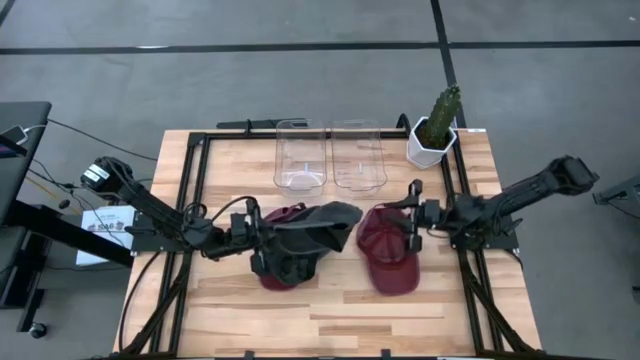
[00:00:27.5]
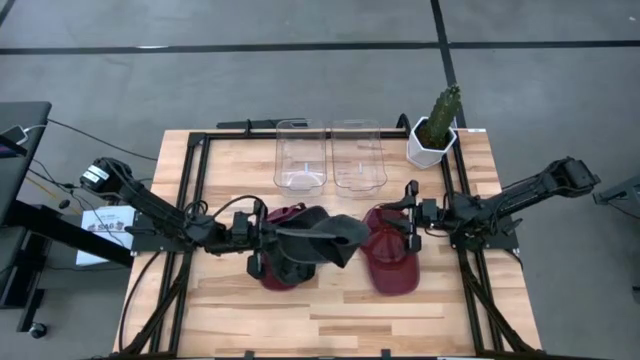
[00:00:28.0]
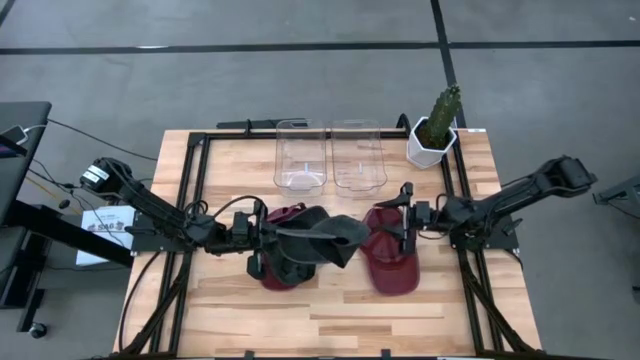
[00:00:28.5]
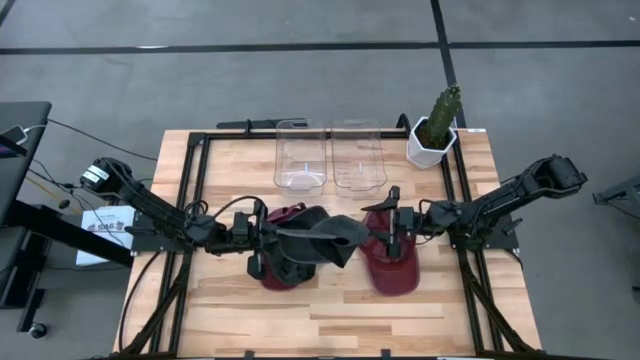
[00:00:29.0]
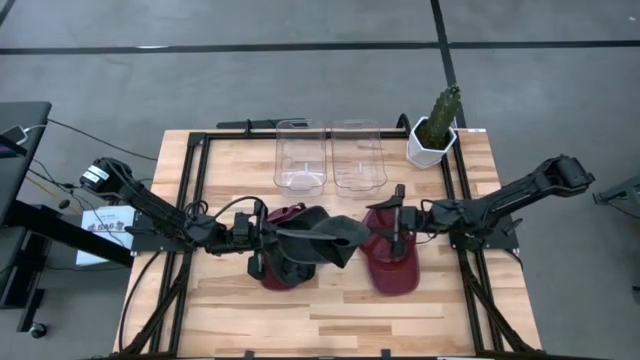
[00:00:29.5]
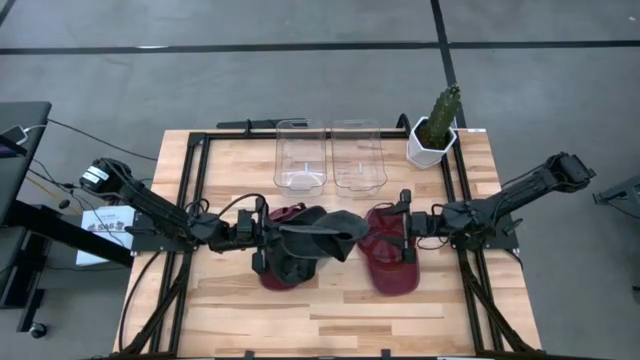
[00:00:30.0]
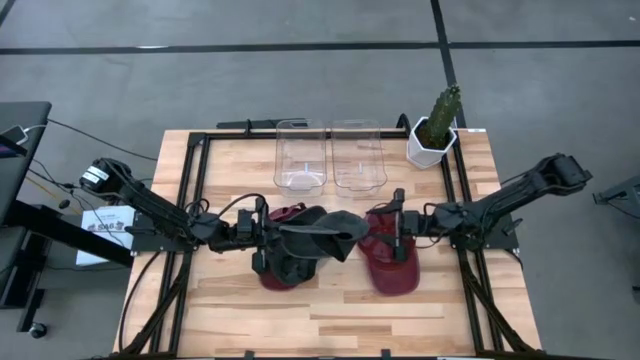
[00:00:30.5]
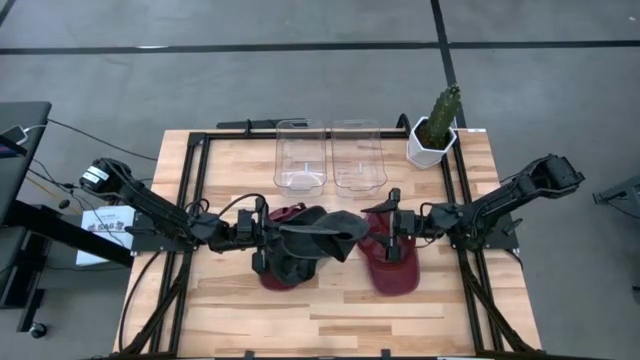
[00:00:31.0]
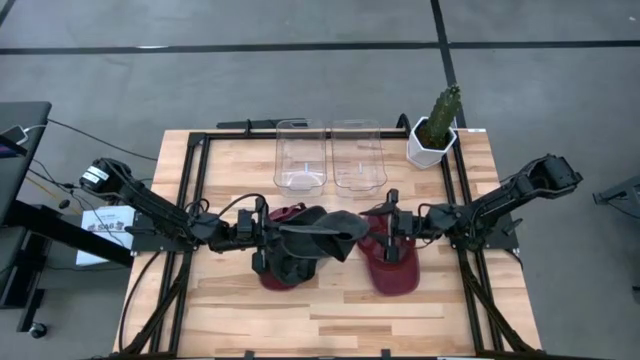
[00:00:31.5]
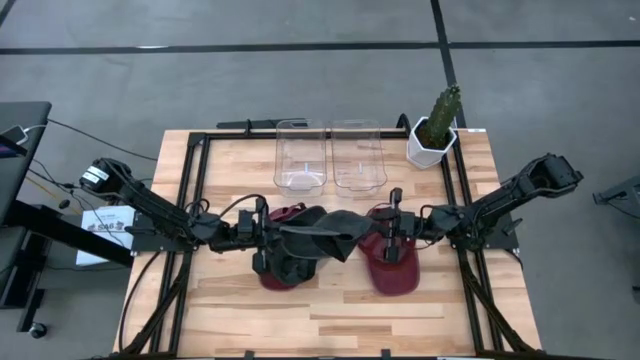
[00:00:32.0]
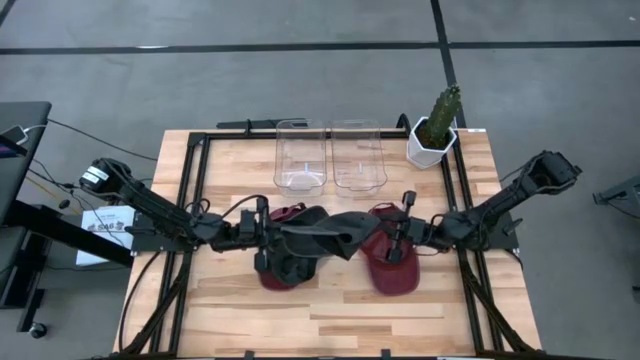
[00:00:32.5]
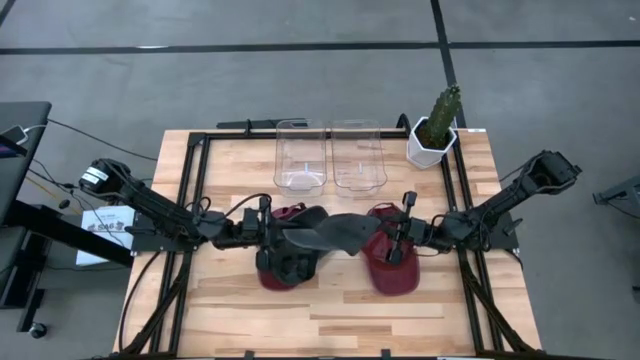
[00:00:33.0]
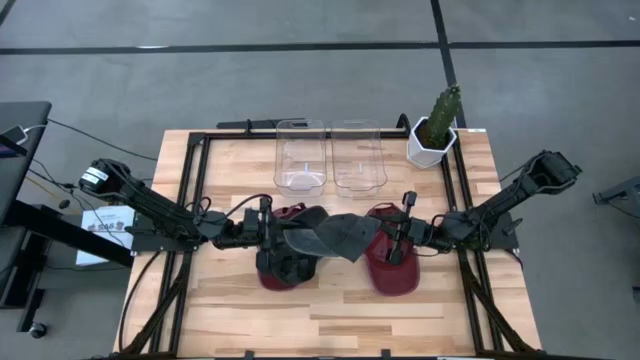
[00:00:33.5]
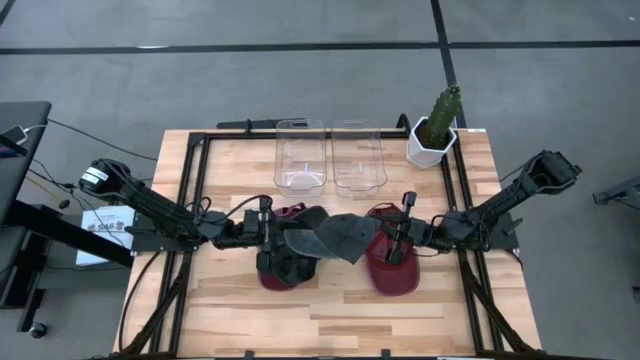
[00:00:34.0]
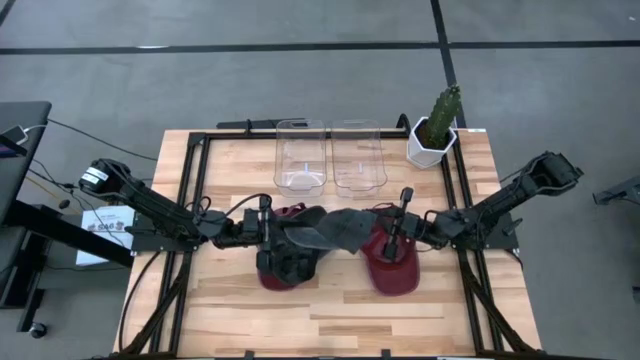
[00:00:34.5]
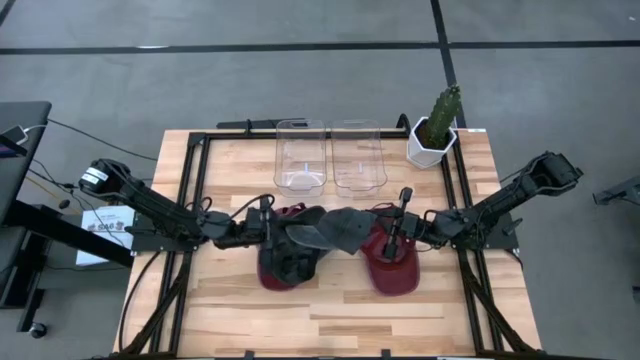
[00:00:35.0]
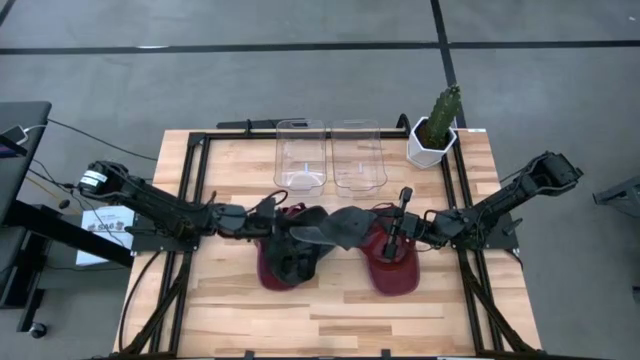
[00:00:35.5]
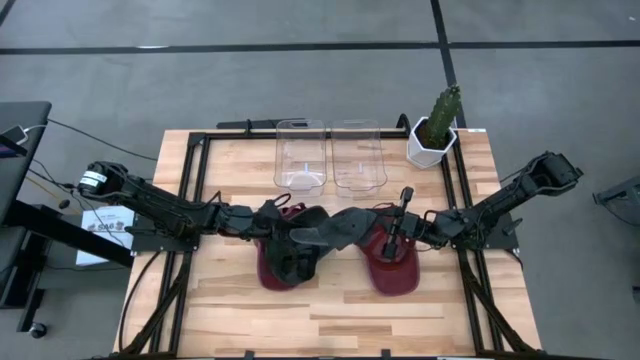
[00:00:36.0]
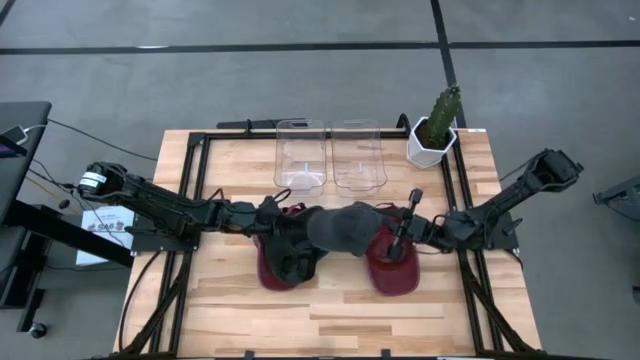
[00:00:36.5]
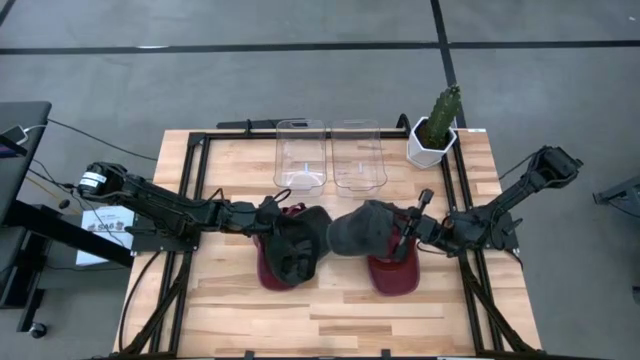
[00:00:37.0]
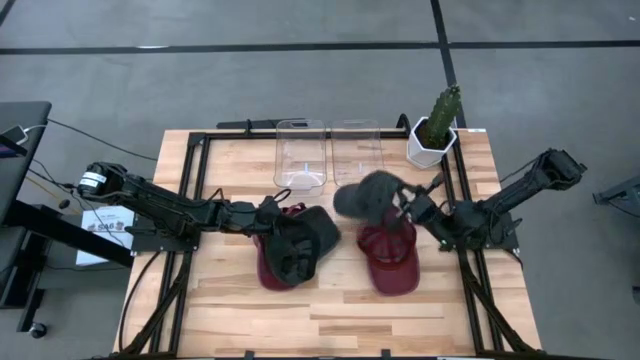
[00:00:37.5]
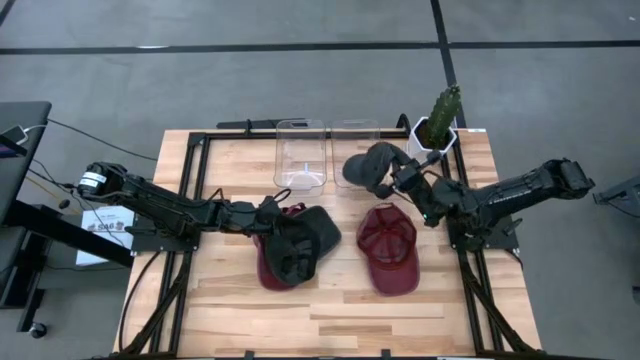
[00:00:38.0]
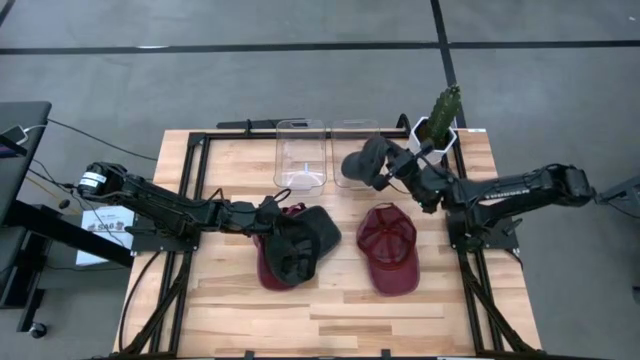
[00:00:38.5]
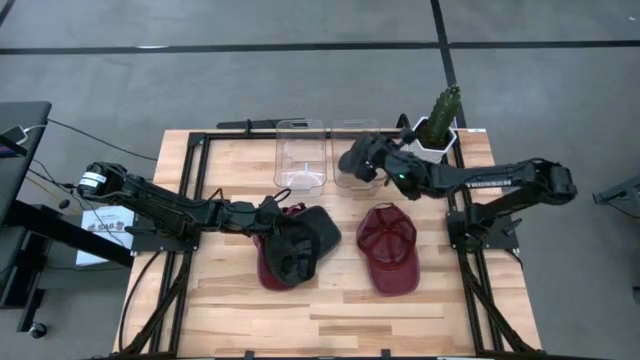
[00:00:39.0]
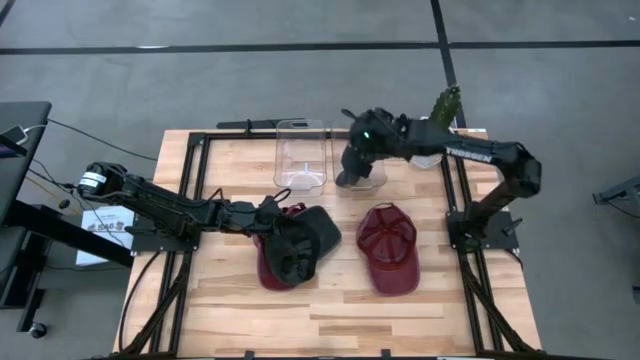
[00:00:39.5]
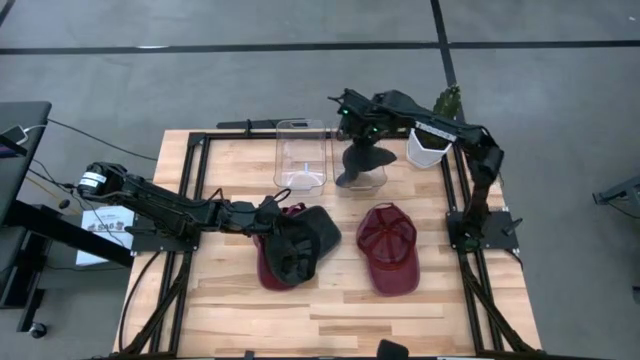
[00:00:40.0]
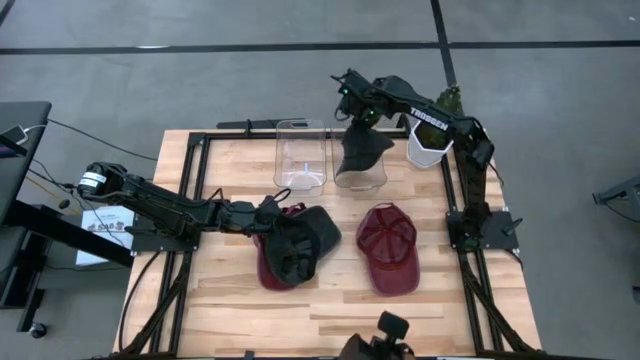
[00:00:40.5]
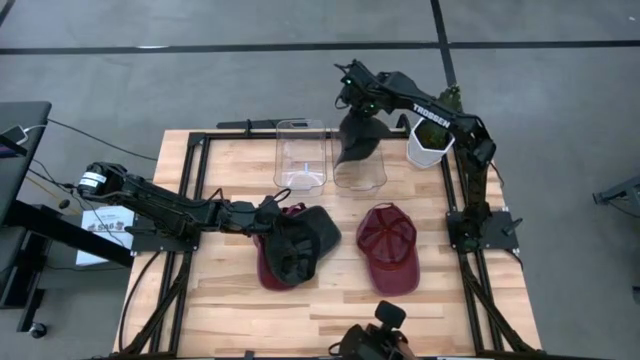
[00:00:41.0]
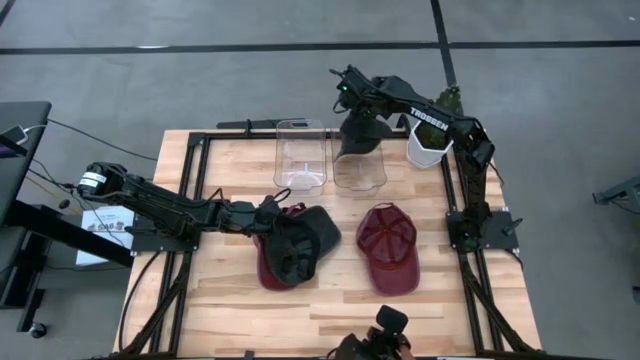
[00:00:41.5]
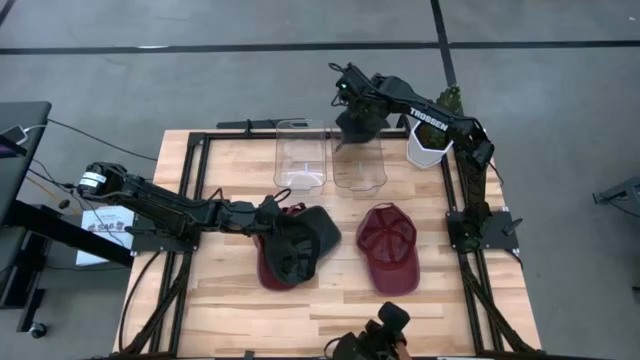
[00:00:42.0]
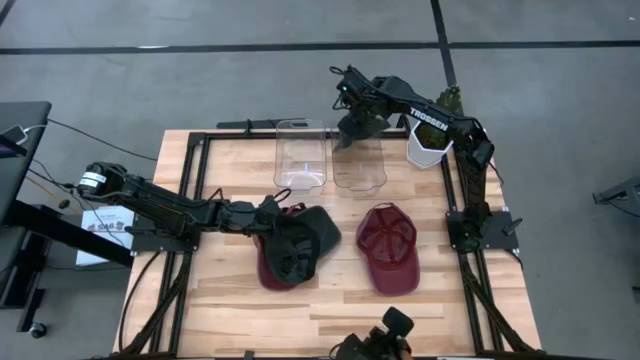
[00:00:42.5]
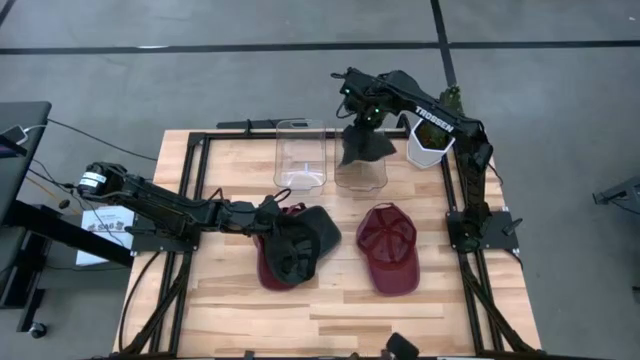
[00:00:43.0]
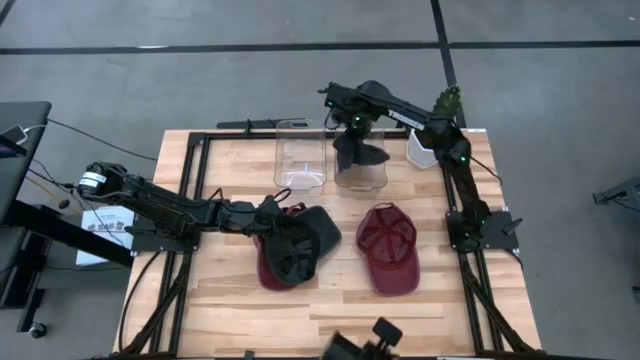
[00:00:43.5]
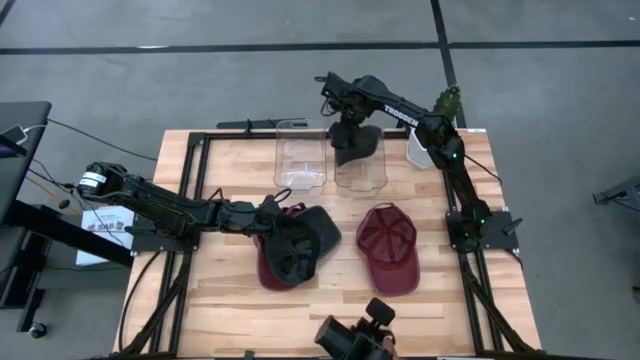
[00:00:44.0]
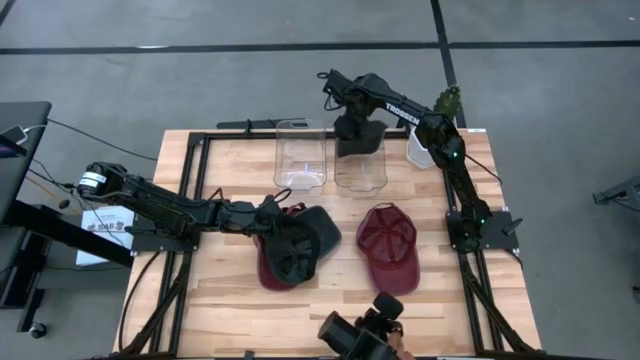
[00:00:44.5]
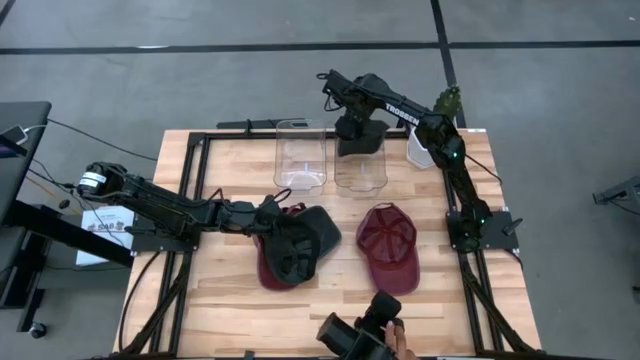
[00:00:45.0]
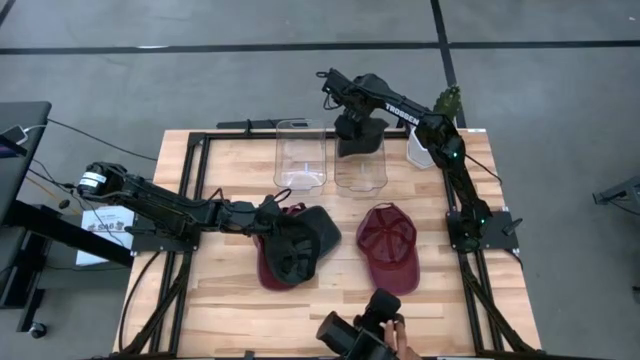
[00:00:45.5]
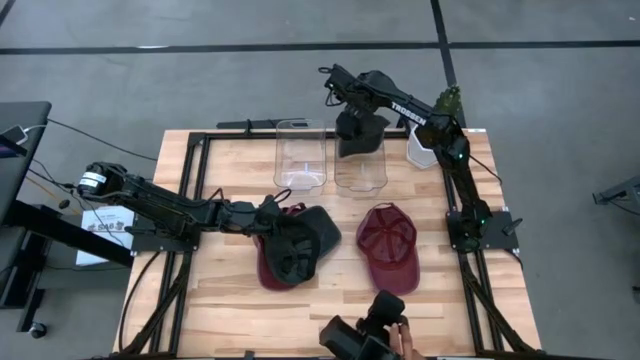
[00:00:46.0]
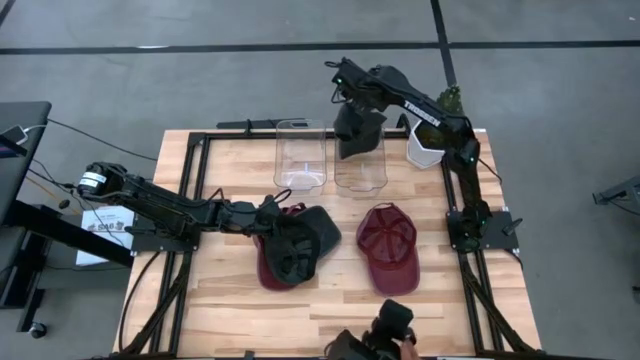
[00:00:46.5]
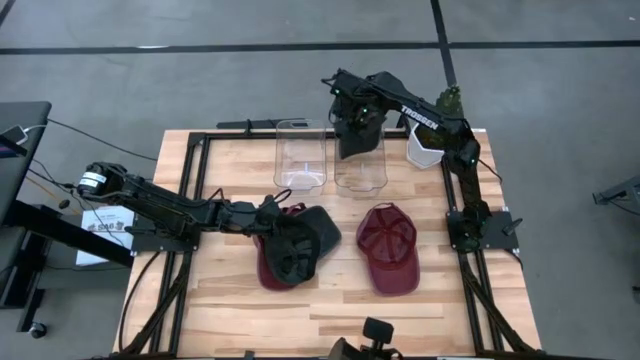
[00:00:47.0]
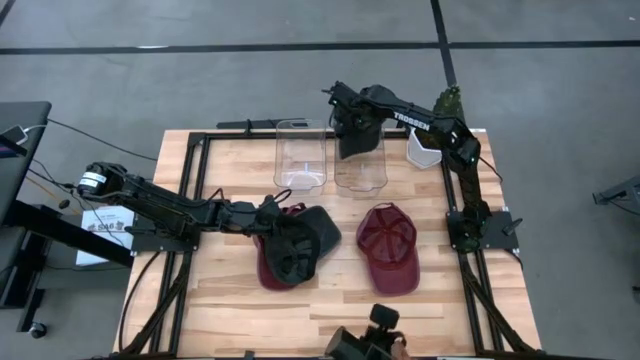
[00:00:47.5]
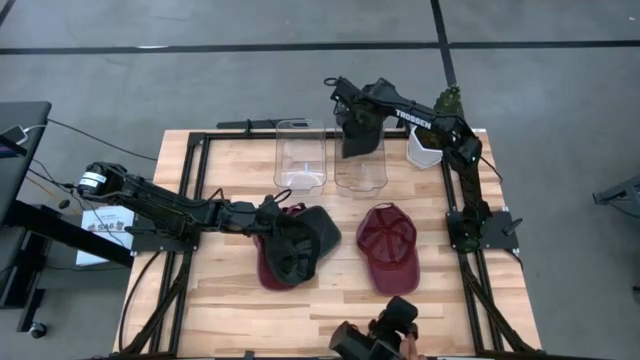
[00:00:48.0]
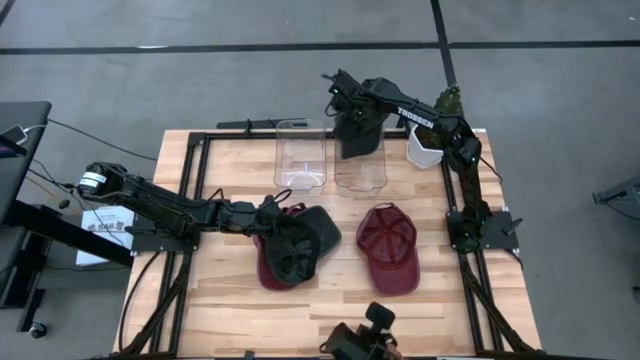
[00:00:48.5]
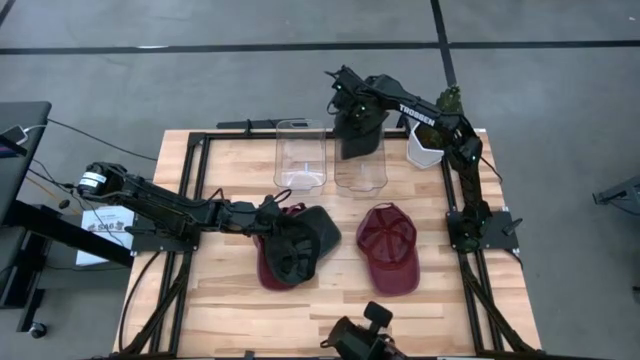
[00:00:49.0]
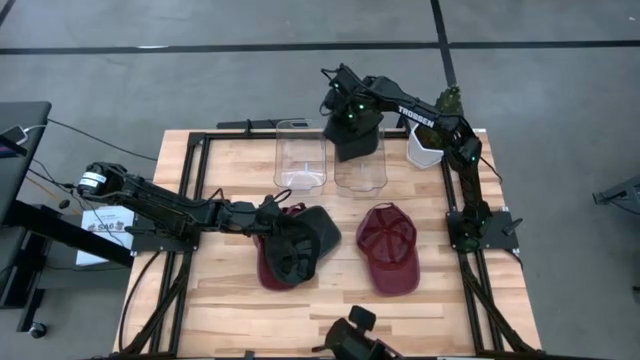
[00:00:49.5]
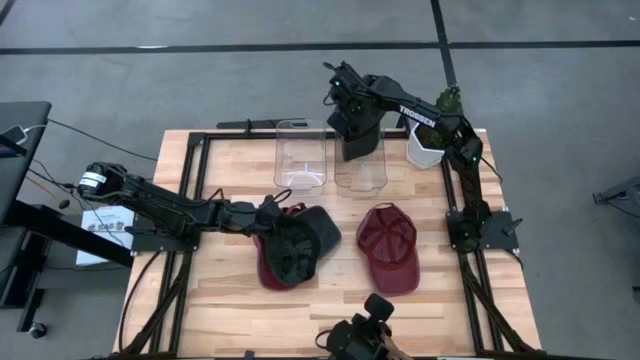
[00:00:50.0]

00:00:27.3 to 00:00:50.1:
Task: Pick & Place hat
Put the black cap into the right transparent bin
